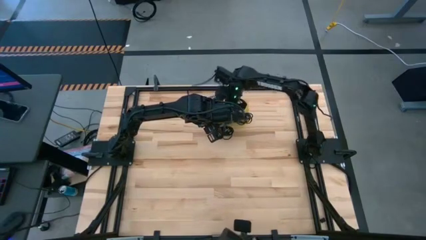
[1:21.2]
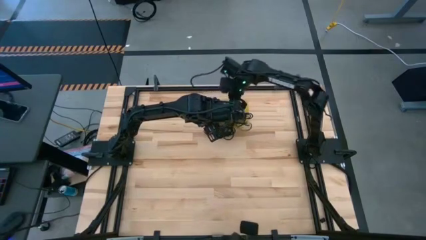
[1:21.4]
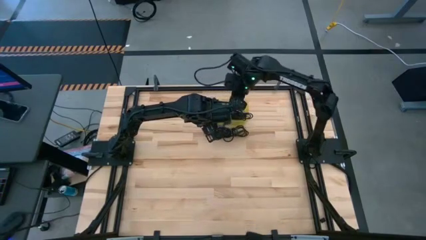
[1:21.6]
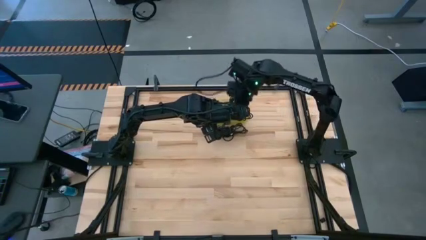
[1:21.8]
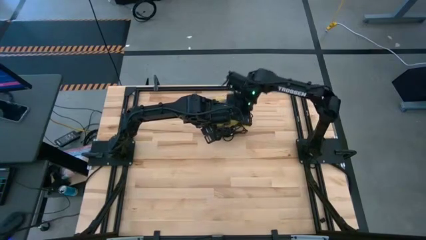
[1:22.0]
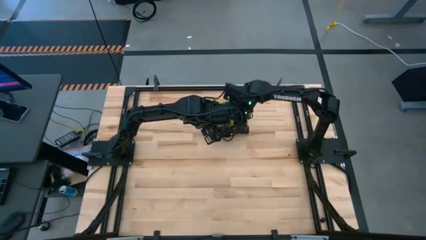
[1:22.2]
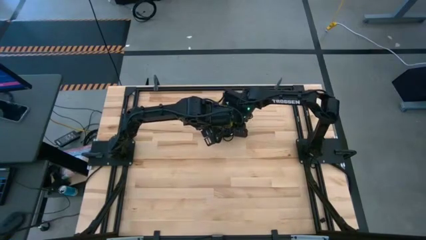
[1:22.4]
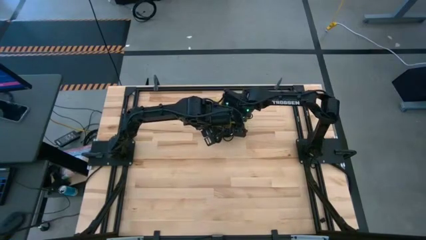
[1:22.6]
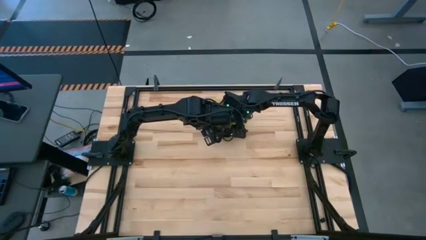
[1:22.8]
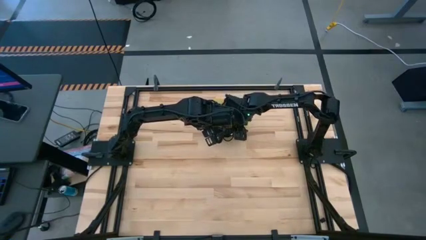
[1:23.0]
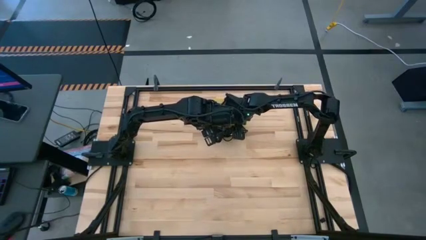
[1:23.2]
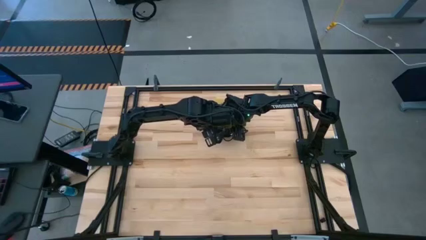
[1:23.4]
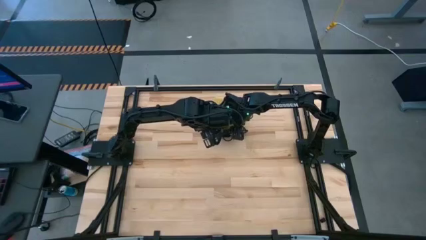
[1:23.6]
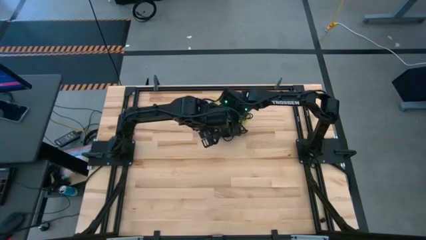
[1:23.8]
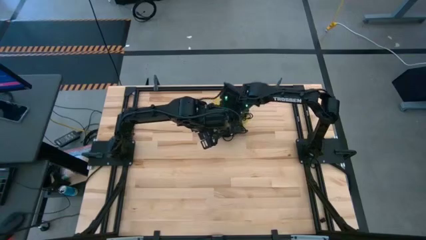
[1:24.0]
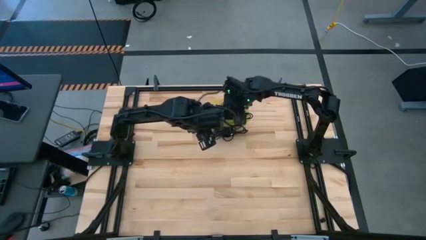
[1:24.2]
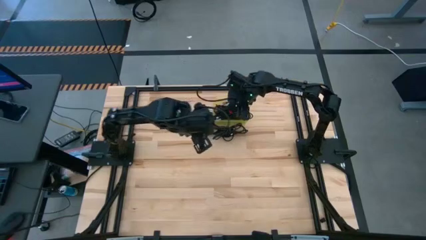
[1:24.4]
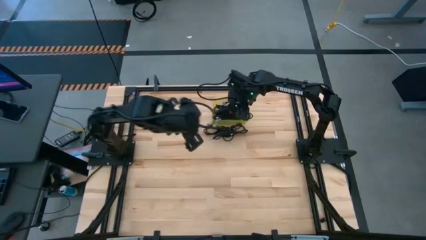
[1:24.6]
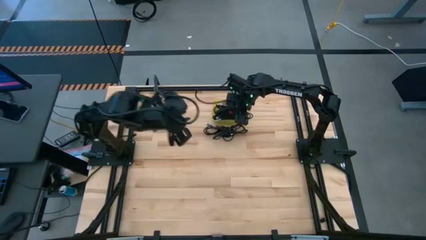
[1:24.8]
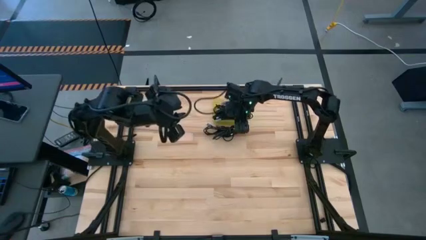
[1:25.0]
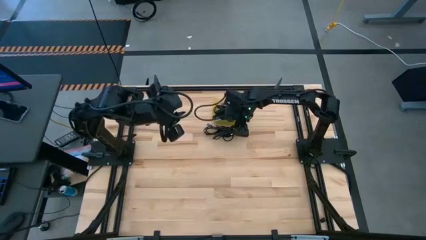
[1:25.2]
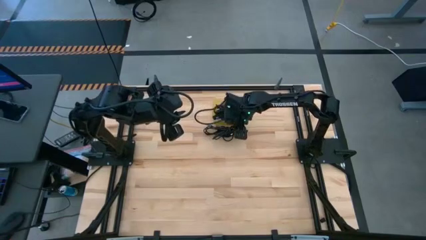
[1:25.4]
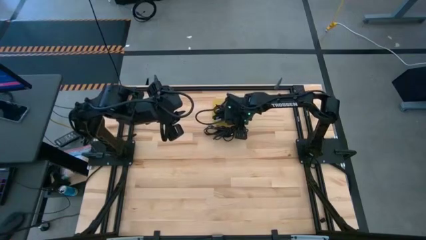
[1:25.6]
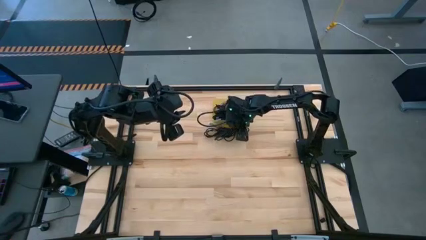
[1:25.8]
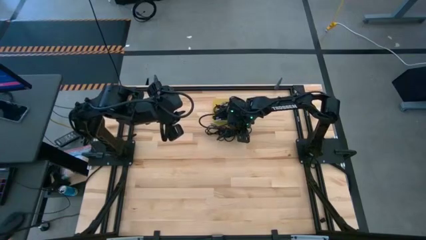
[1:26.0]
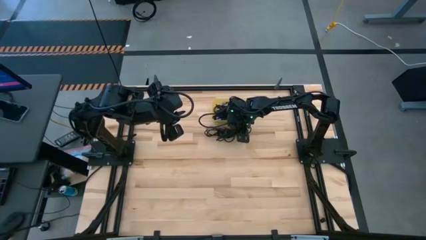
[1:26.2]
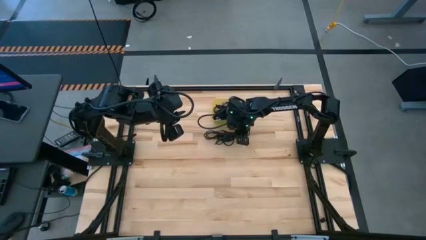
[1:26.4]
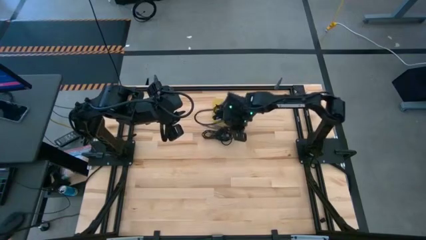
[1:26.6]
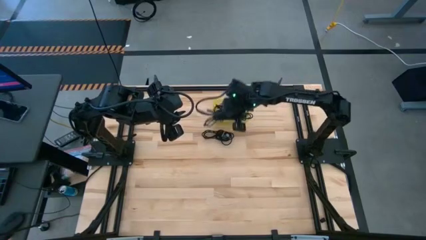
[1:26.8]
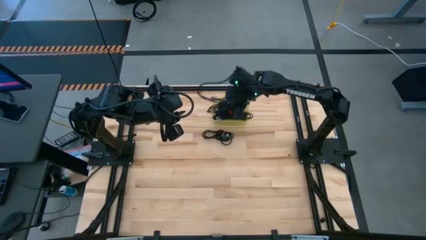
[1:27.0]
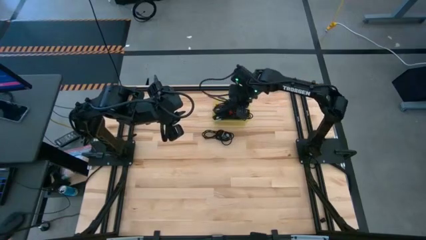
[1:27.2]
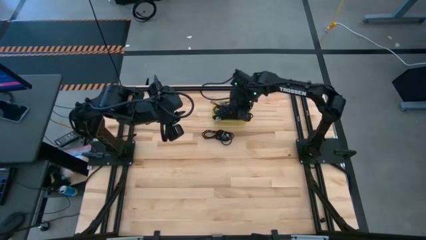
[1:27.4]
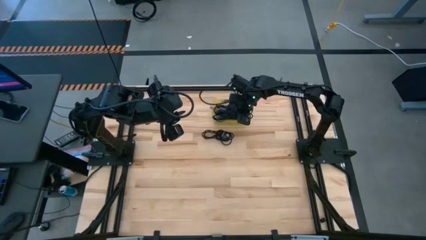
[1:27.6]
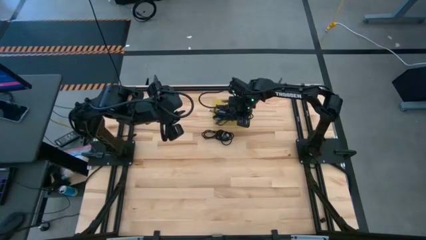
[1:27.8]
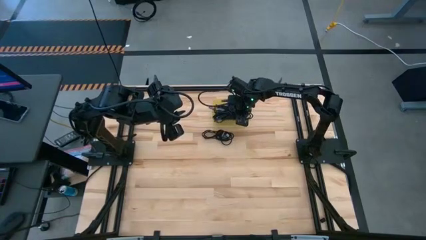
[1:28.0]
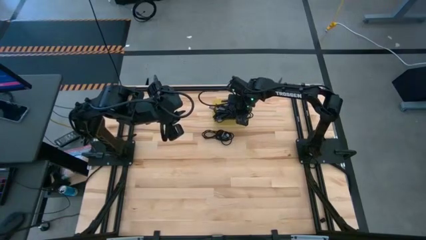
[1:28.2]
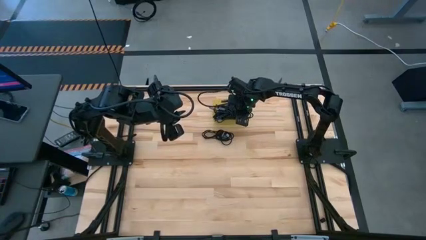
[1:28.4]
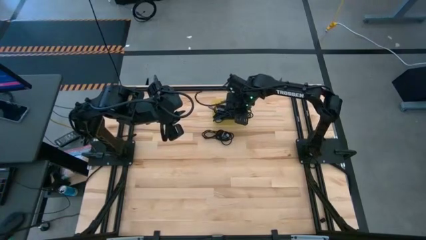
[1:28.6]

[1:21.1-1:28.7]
Task: Pick and place USB-C Cables
Put the black charger cable into the yellow bin

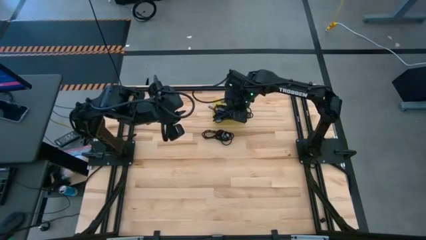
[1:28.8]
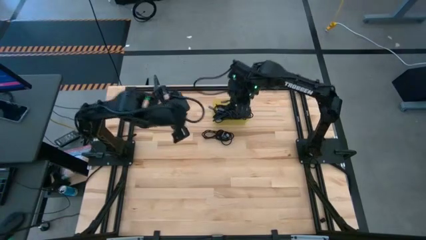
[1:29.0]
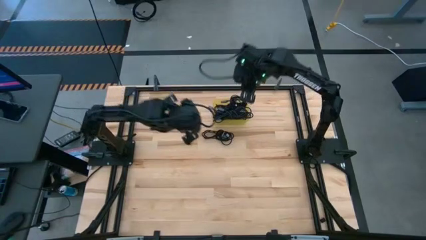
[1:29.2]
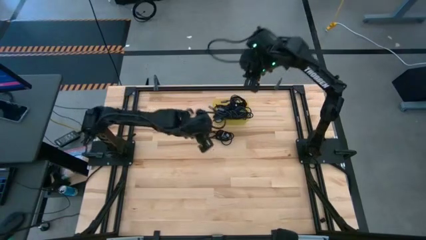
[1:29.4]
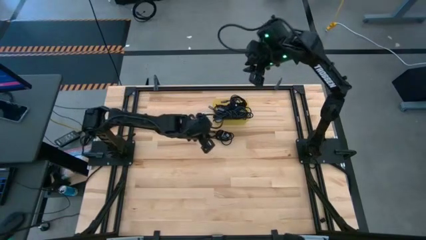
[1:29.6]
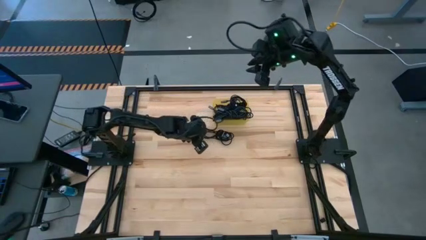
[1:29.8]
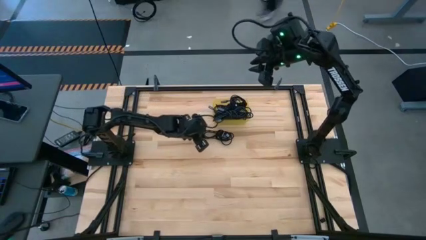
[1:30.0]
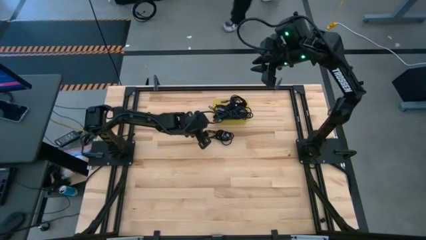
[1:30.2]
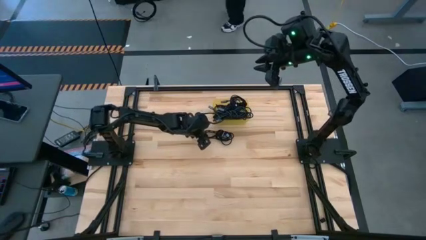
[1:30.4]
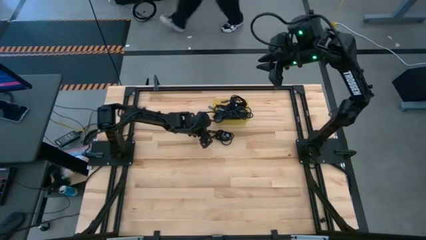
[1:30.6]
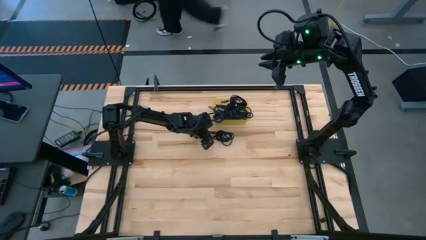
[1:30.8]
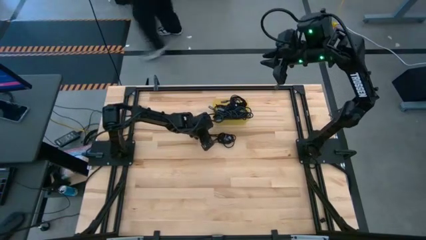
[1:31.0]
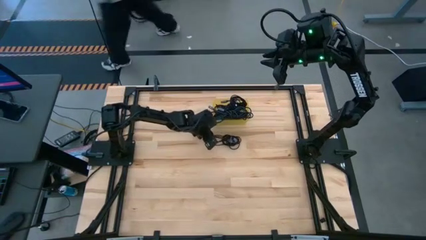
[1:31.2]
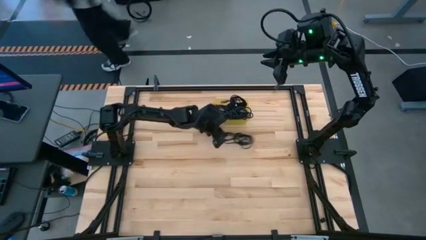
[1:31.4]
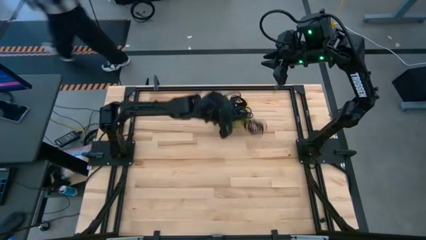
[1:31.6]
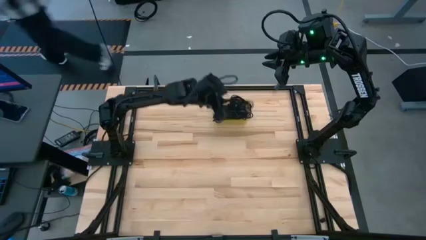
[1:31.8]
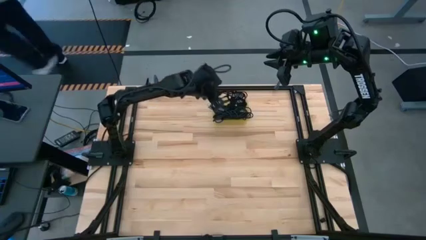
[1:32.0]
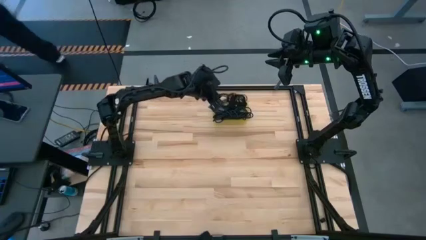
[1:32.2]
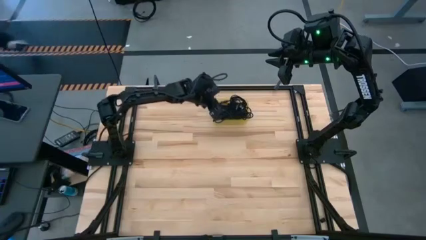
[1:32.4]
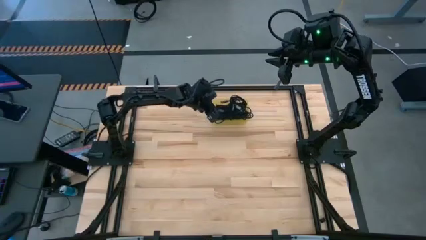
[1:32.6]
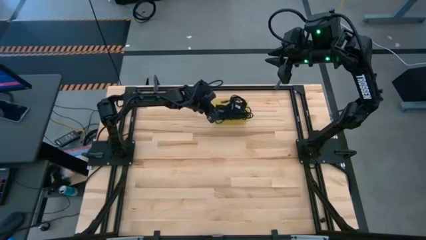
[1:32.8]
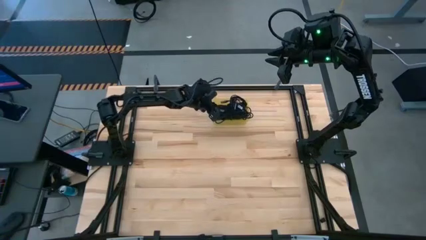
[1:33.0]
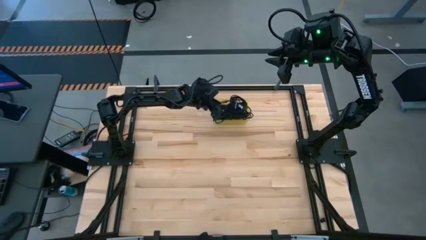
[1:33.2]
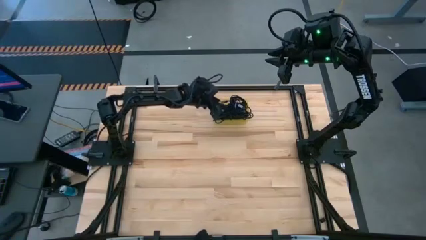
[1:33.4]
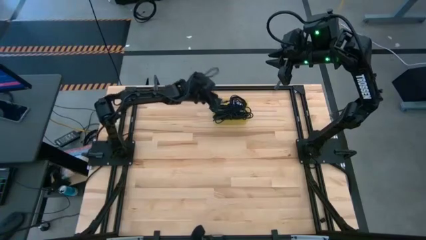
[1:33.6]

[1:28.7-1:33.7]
Put the black charger cable into the yellow bin

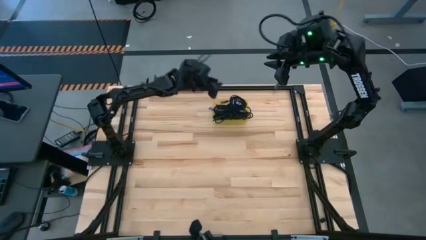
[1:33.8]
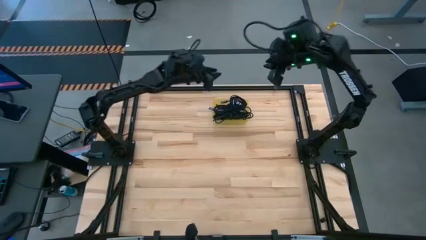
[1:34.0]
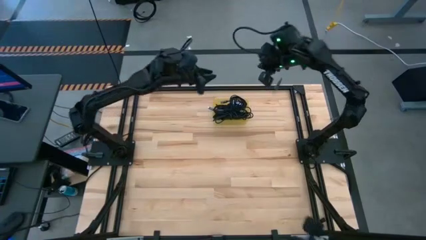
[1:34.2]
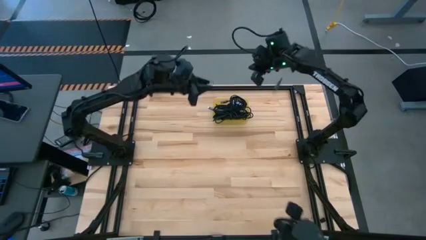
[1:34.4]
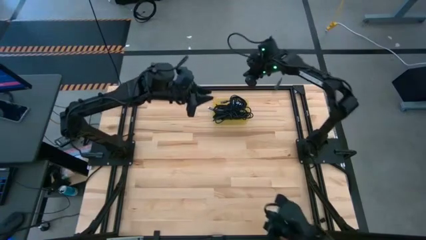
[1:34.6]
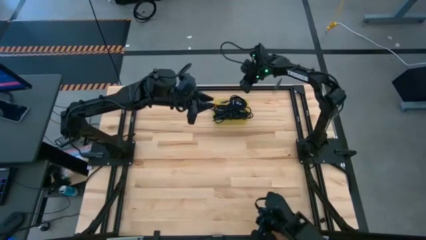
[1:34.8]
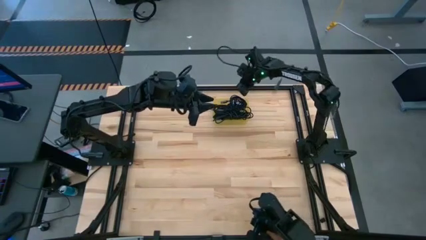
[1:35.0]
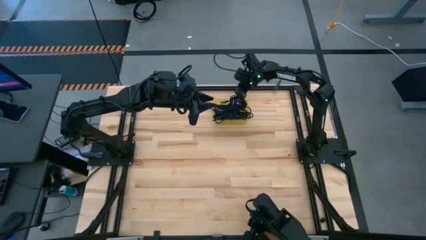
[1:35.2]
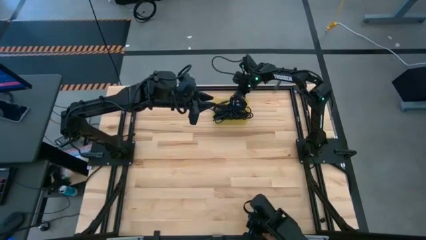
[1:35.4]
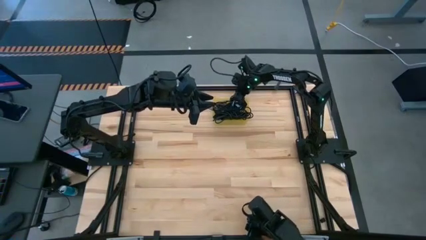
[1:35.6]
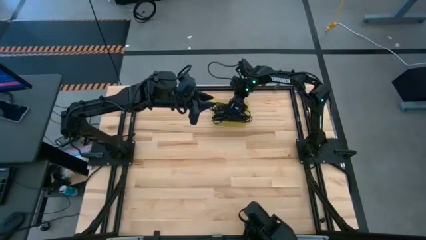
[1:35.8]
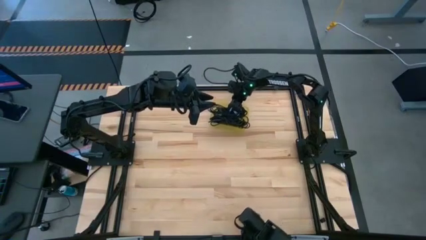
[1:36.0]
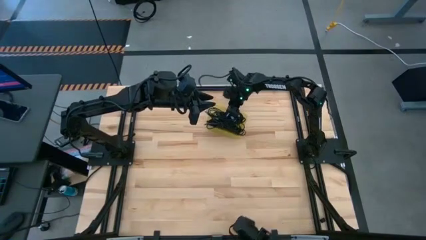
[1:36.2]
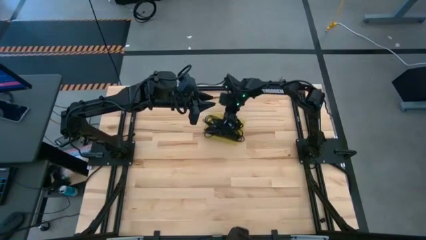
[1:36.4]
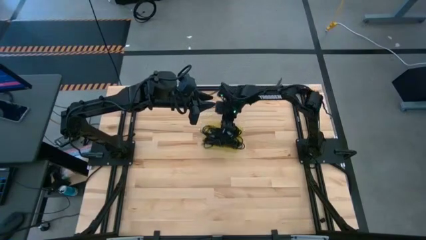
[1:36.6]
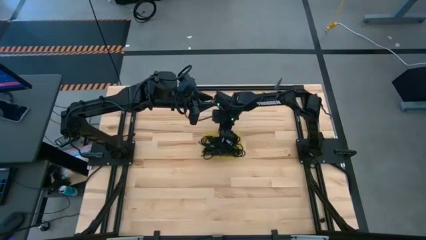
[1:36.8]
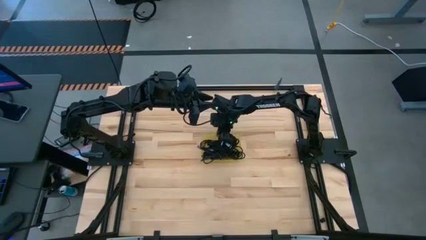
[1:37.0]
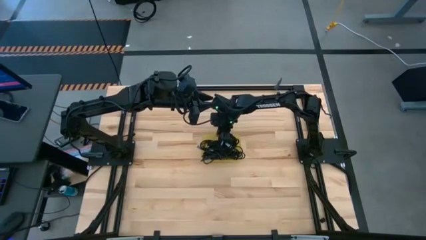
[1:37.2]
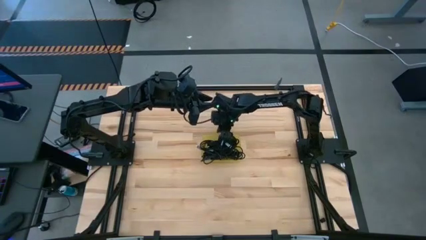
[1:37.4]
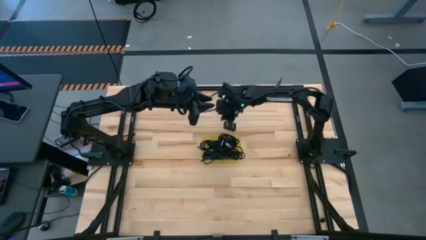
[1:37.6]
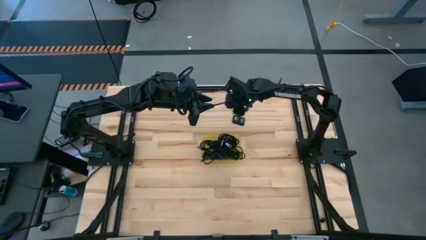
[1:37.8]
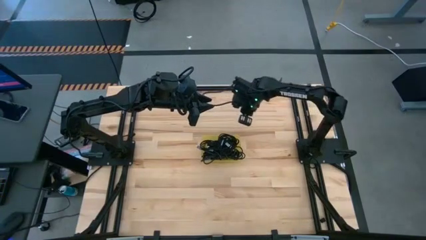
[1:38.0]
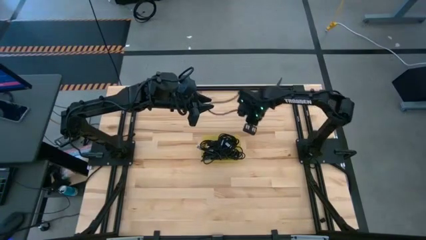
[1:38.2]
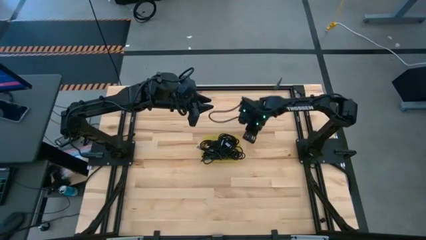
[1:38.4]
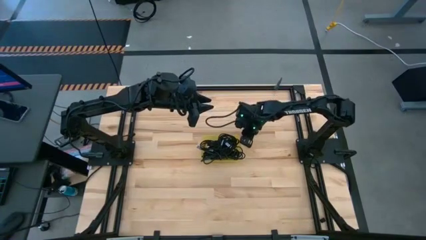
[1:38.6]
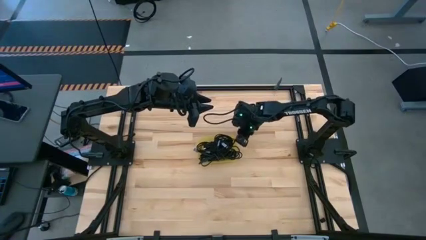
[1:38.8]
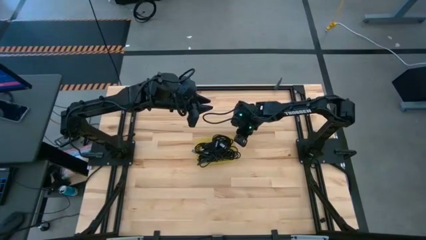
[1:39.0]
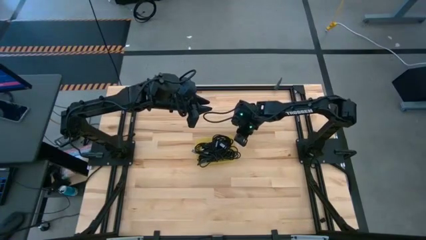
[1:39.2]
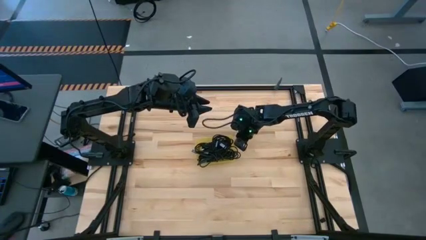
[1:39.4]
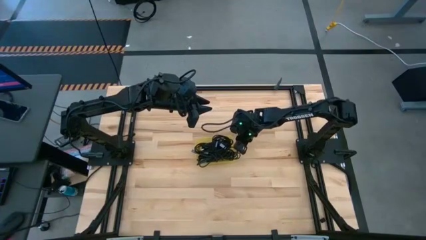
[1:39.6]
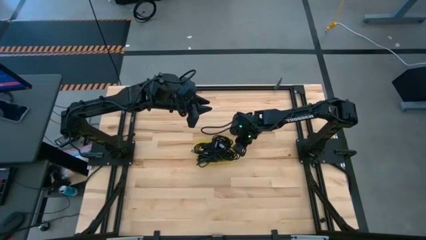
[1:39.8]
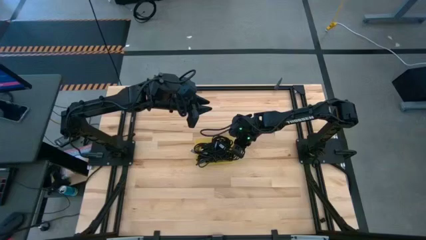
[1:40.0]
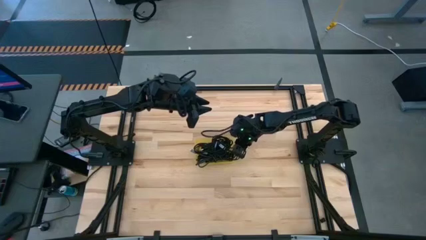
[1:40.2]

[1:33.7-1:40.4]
Move the yellow bin to the center of the table
